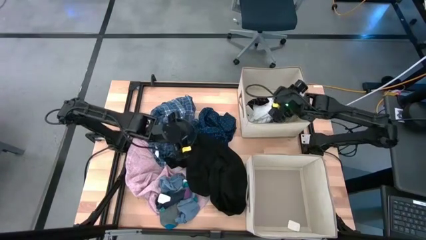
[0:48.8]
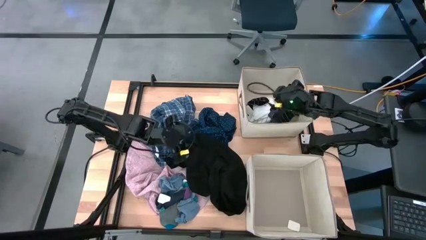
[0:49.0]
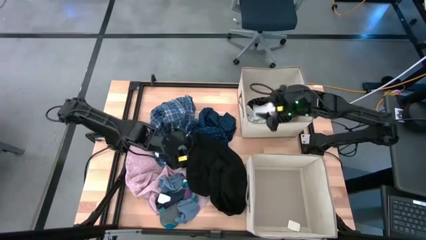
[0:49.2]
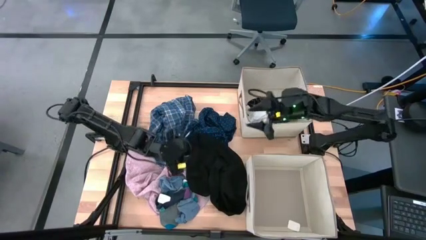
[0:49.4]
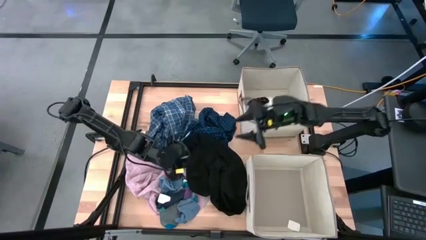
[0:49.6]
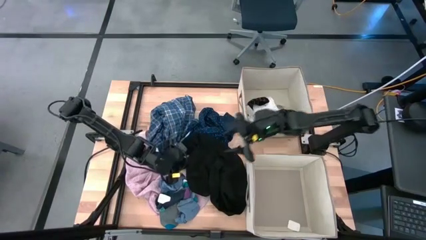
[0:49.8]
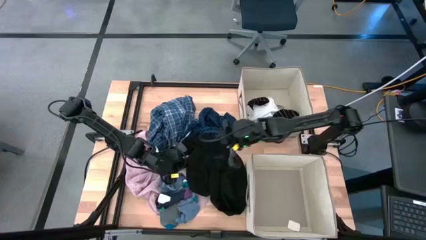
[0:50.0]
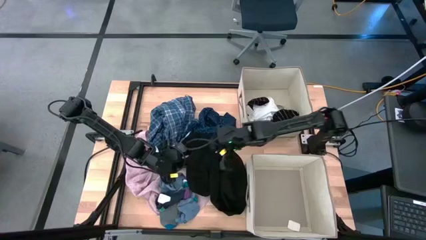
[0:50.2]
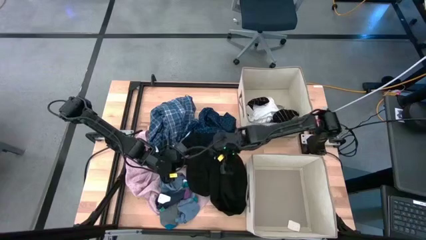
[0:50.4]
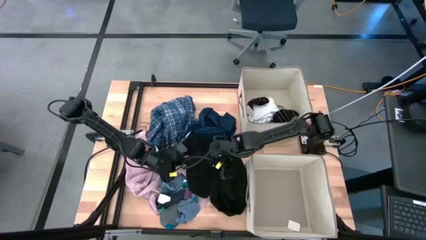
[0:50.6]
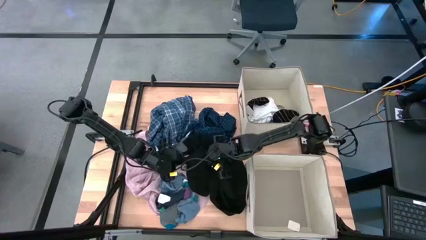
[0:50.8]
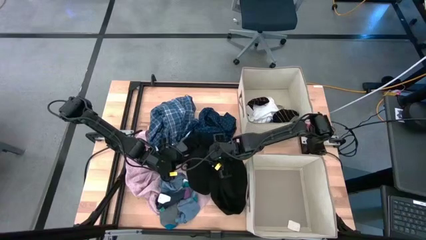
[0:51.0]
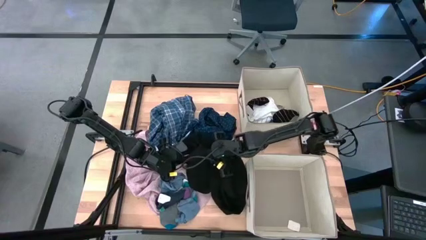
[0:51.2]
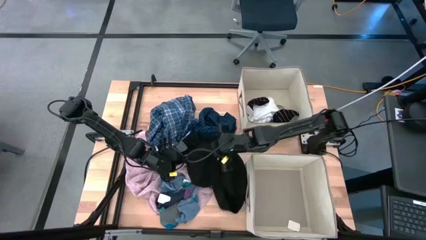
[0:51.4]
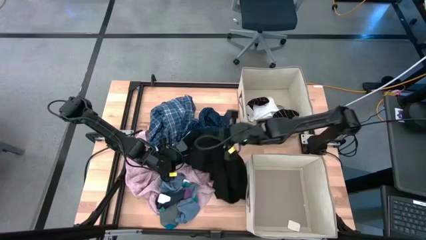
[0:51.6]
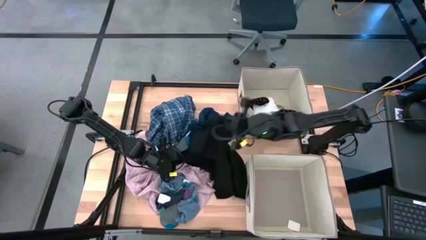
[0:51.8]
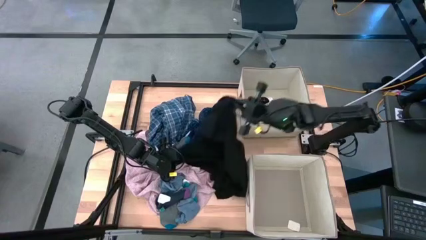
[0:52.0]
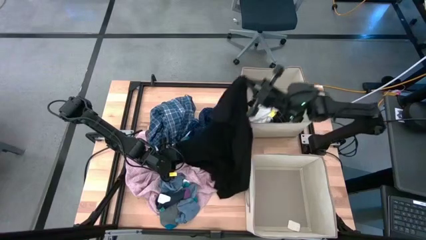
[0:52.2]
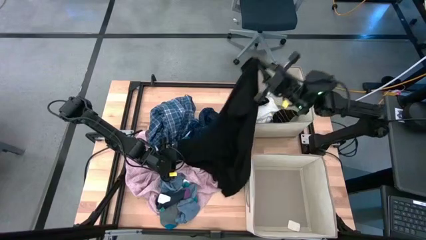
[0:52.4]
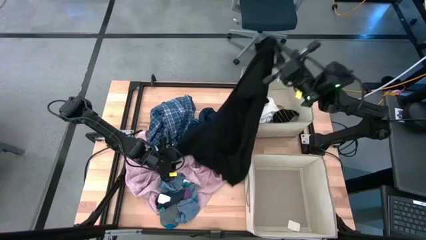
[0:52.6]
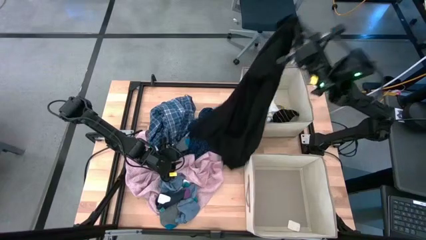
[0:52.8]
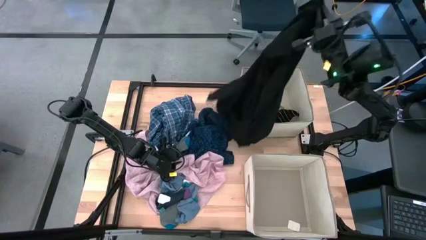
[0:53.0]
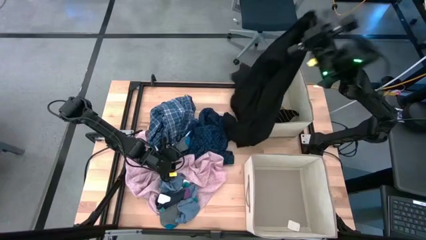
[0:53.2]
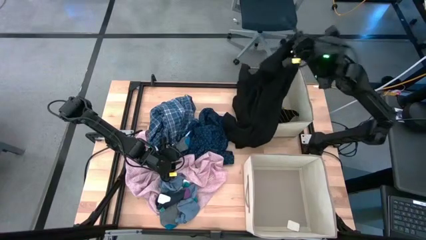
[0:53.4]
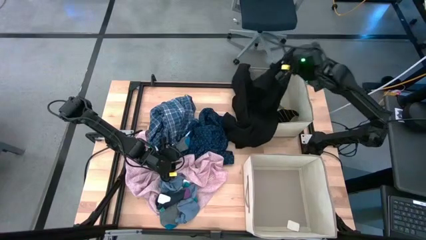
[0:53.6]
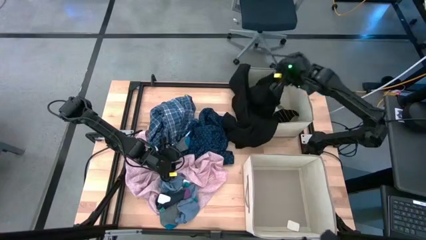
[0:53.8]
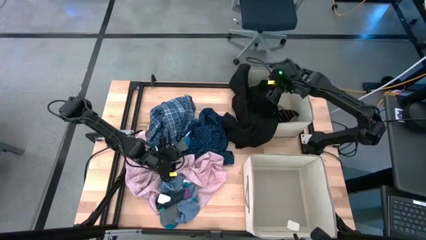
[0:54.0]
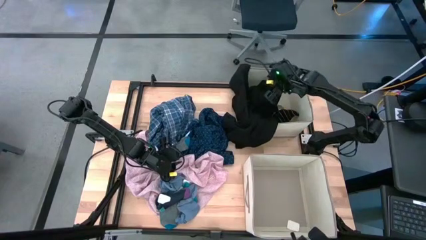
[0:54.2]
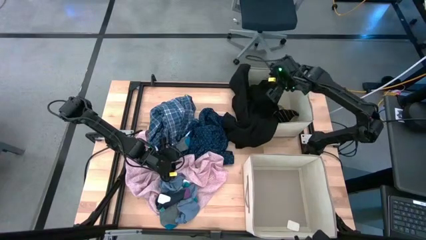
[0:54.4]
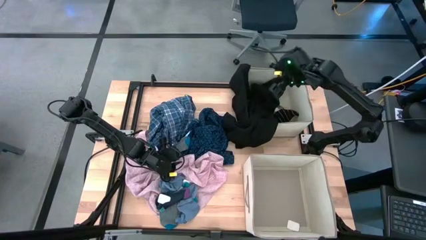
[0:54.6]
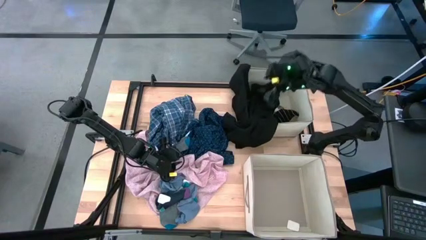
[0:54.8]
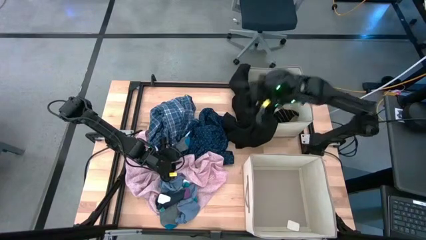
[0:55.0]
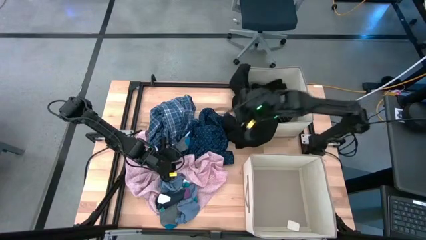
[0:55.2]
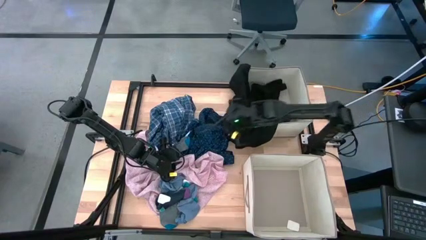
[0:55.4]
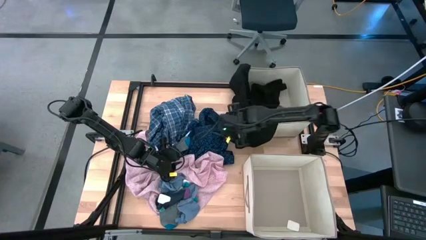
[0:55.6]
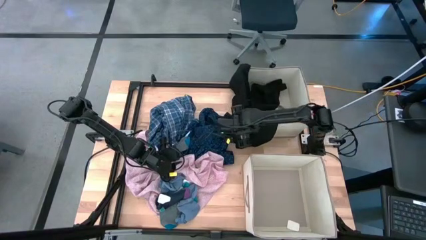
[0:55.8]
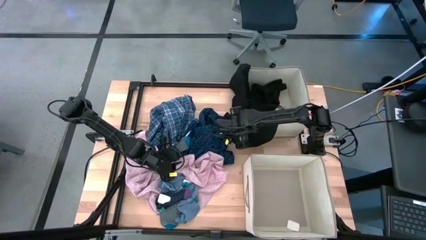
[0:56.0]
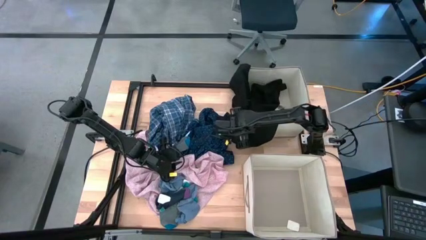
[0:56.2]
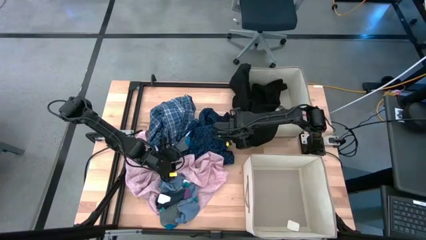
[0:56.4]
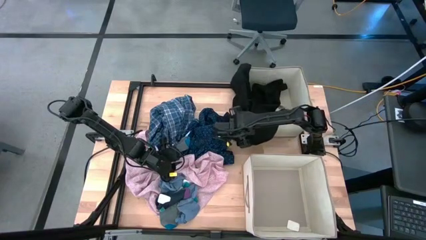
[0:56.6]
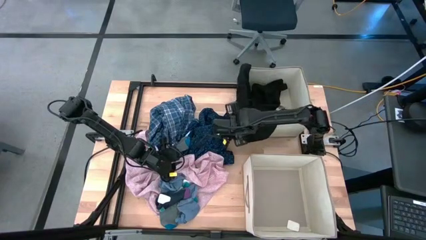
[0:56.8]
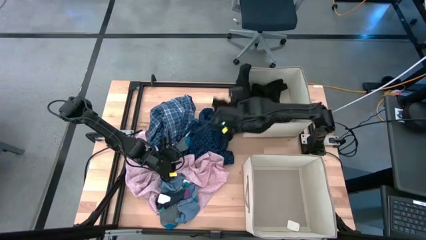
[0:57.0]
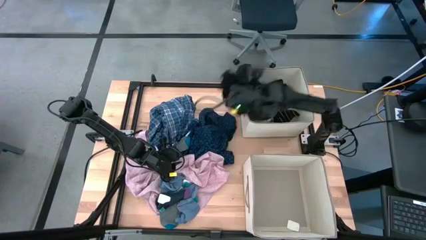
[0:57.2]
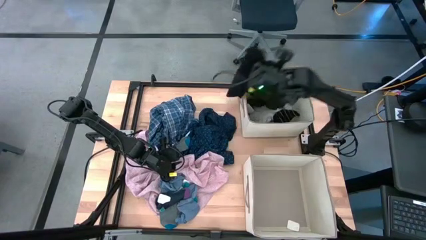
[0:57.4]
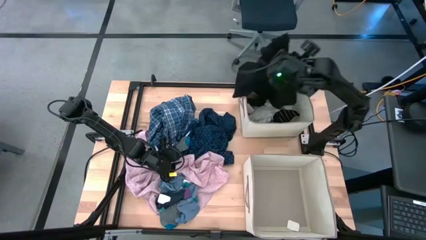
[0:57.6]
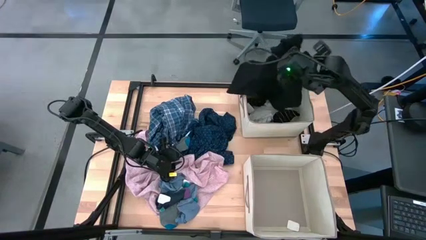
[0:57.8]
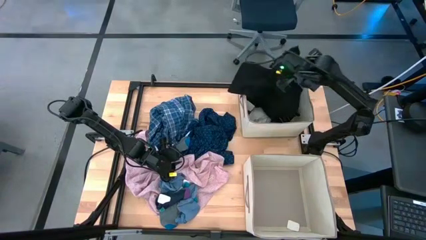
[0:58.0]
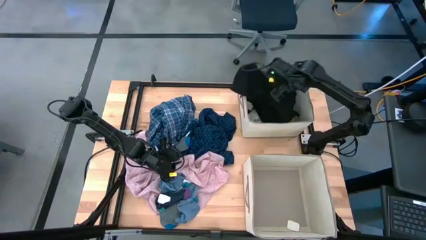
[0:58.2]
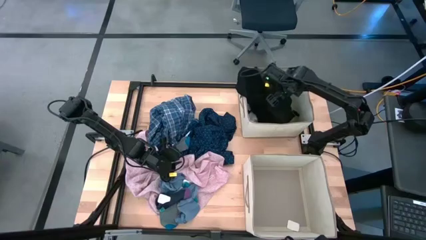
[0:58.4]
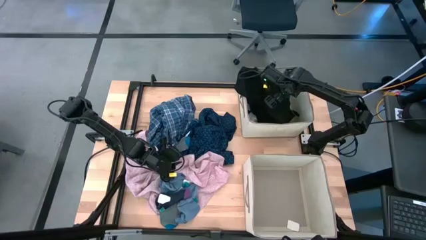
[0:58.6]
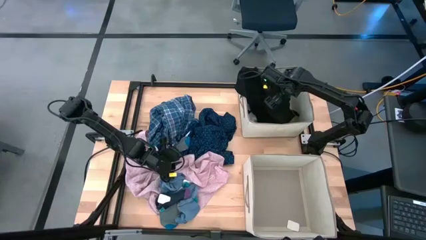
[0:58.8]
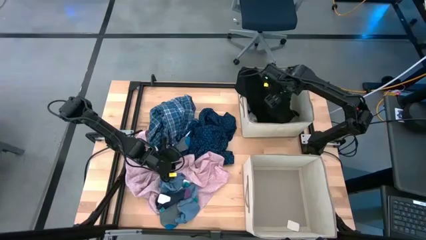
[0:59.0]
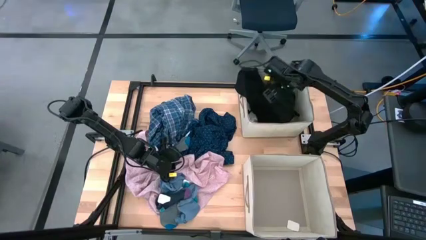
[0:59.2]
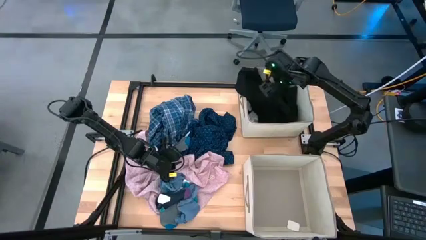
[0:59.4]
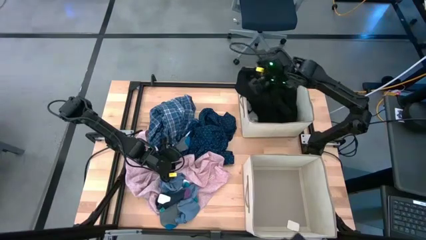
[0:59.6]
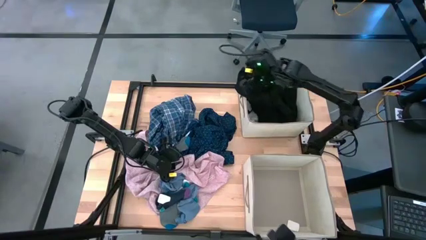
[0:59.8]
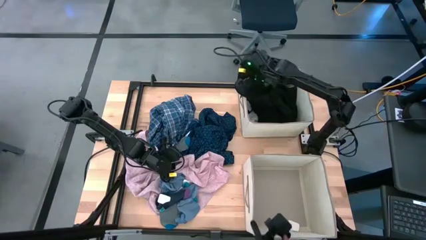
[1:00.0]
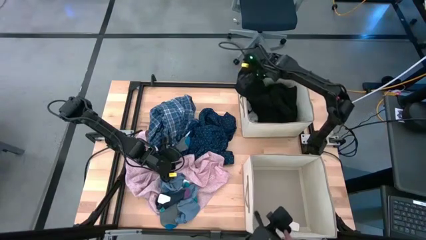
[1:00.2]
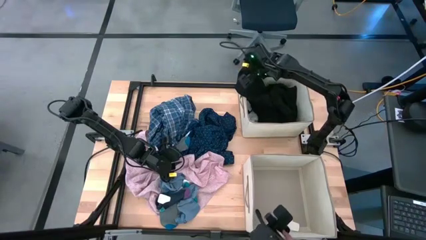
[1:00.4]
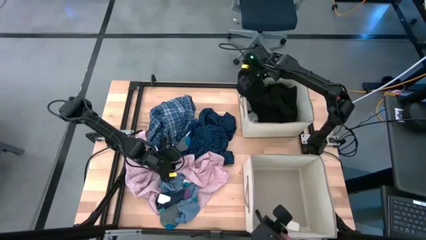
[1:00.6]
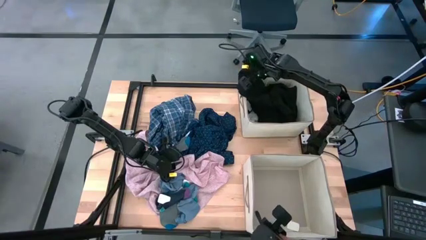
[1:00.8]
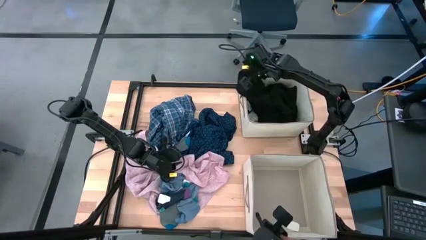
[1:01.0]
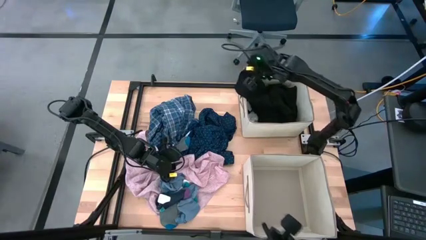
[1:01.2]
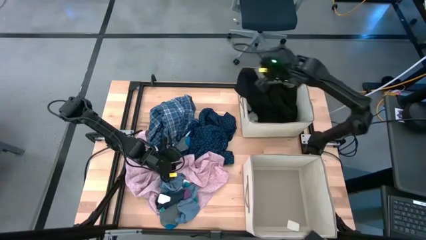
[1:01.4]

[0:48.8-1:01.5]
Task: Sort clothes
Put the black shirt into the top laundry organizer

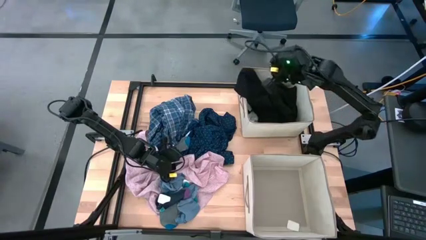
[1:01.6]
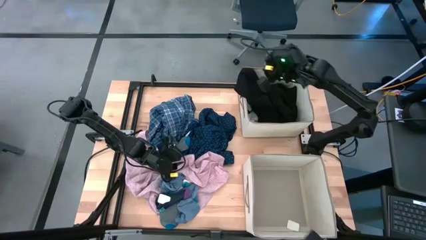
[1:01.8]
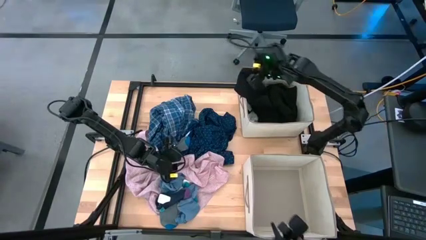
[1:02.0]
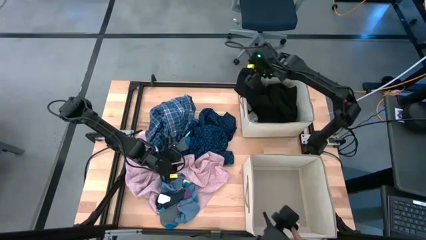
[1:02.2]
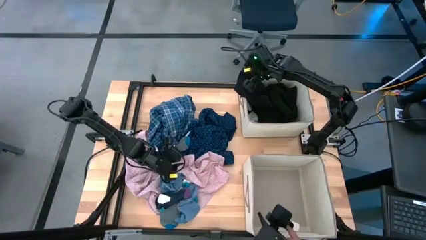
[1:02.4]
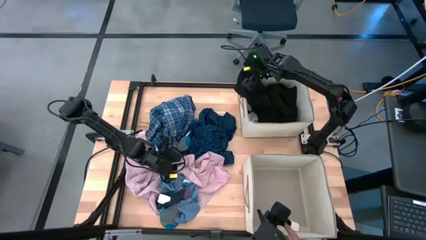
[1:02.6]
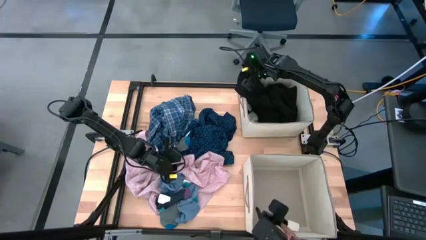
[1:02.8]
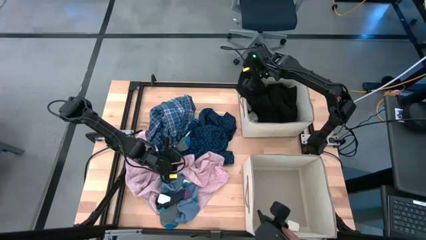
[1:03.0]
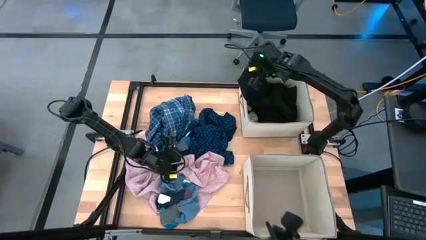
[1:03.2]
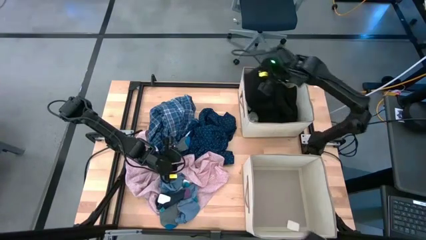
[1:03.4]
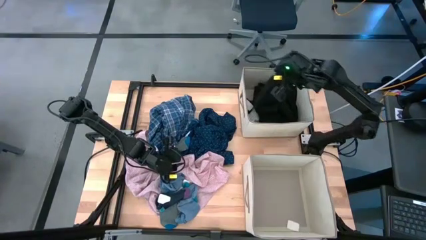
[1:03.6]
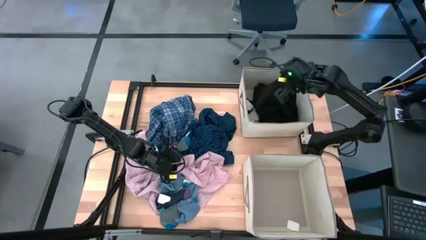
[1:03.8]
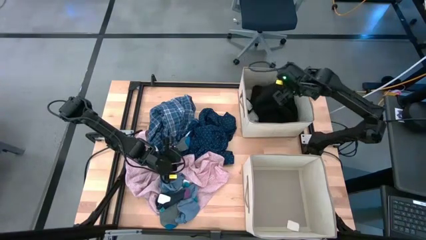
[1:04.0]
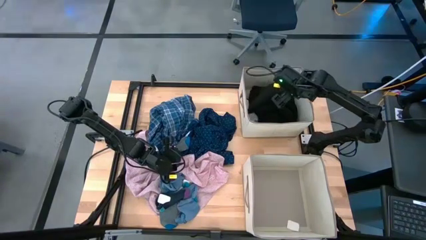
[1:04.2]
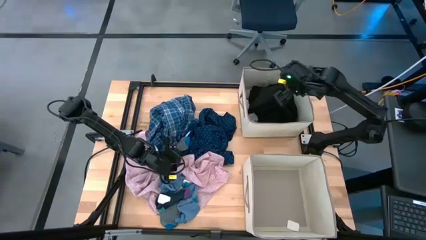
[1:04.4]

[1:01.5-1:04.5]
Put the black shirt into the top laundry organizer

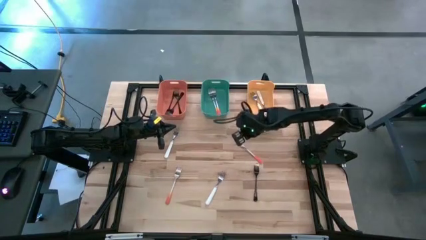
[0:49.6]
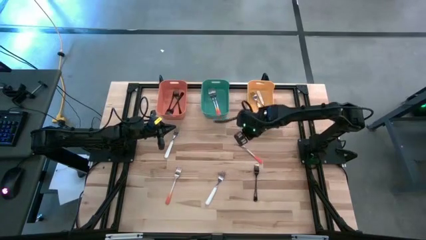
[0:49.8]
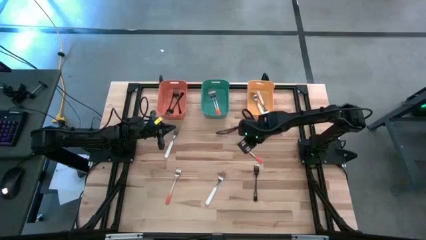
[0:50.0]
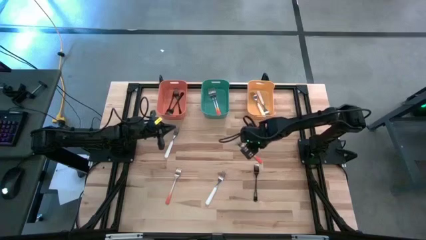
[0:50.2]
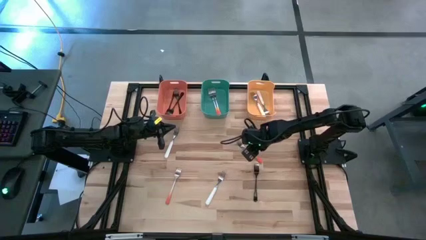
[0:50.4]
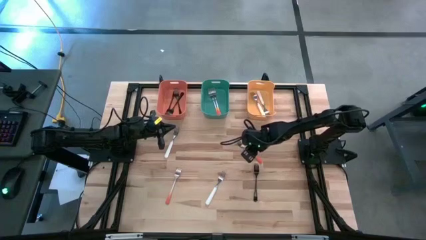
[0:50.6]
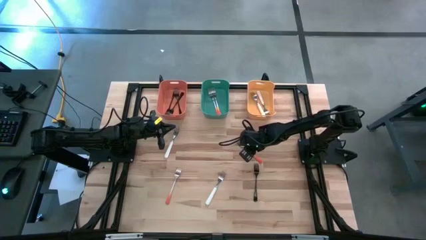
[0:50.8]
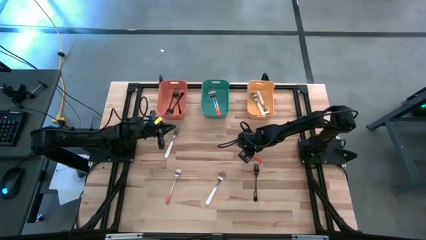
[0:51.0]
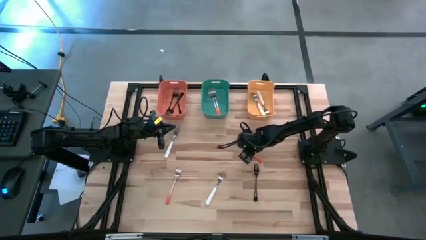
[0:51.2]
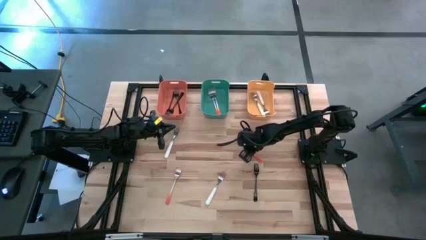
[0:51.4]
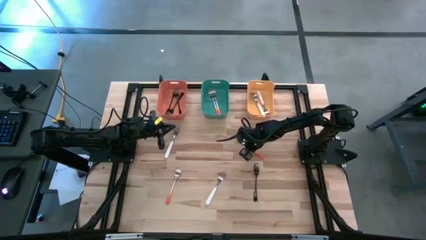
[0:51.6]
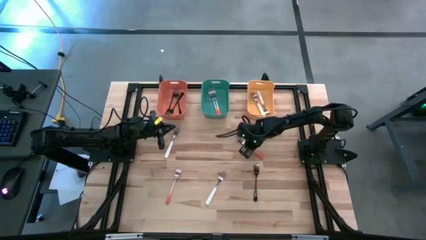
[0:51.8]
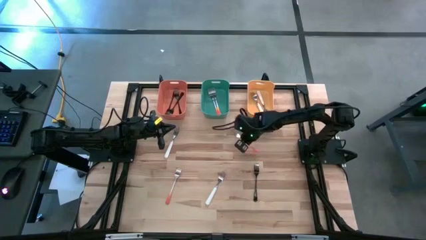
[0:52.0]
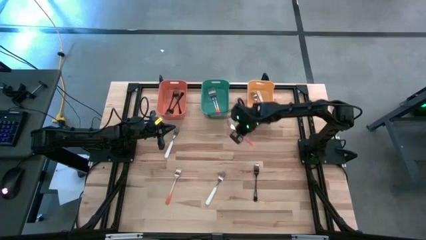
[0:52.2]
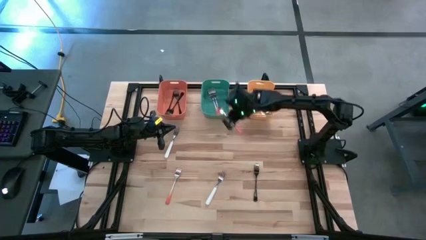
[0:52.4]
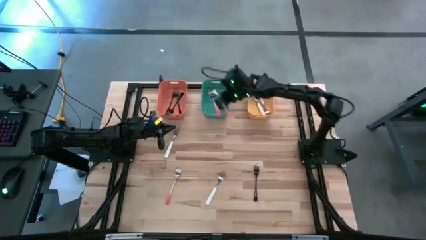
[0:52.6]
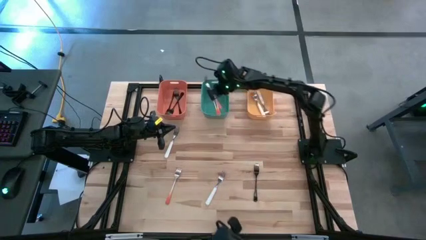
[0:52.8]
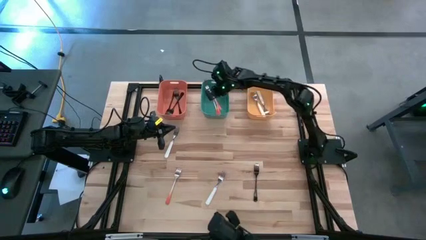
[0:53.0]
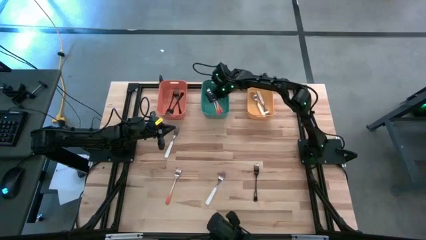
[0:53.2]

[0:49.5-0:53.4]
Task: Sort silverware by color (type)
Put the top orange fork into the green bin
